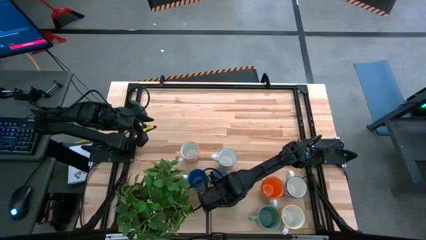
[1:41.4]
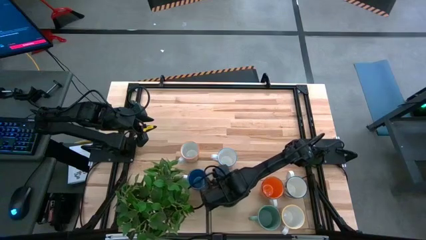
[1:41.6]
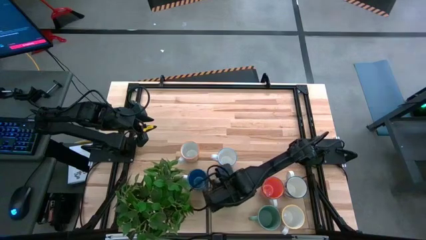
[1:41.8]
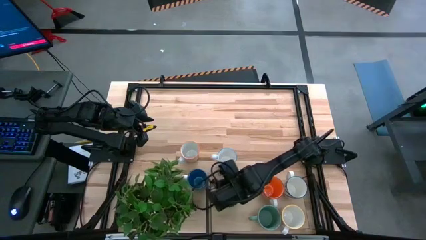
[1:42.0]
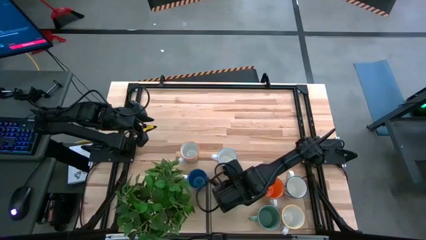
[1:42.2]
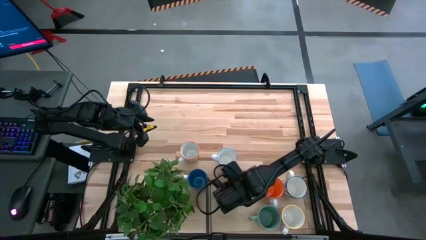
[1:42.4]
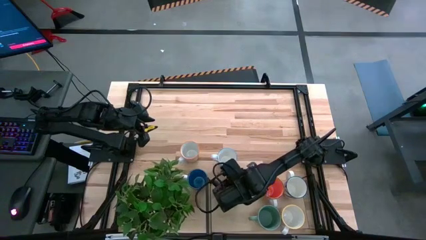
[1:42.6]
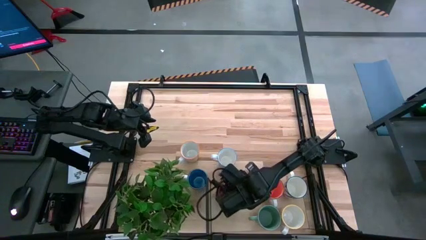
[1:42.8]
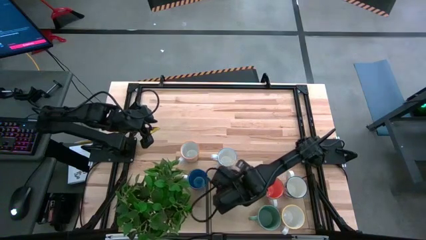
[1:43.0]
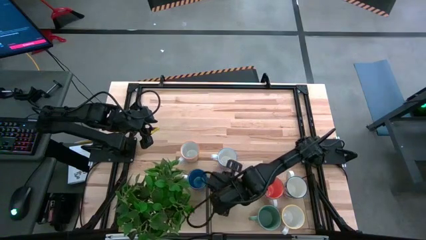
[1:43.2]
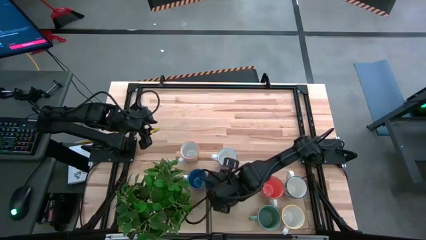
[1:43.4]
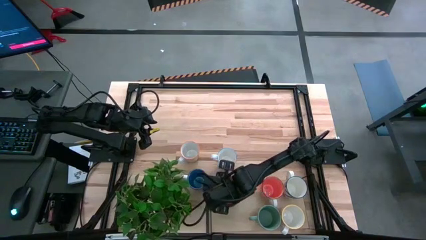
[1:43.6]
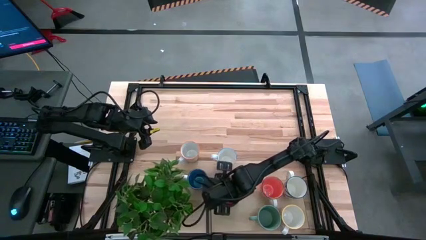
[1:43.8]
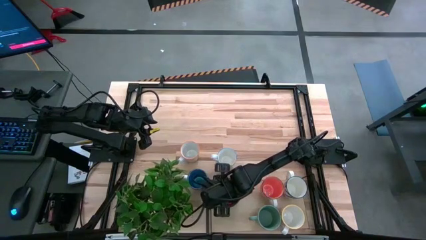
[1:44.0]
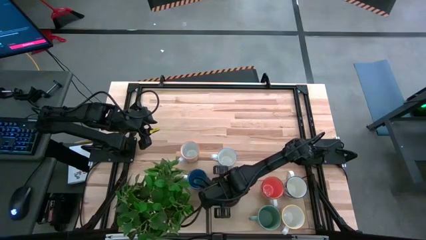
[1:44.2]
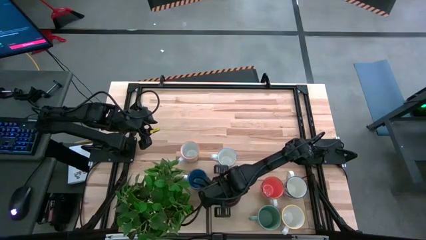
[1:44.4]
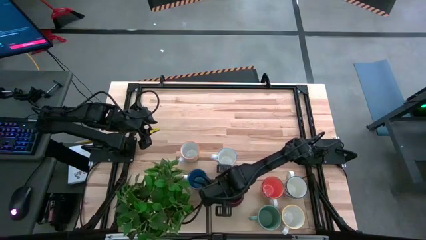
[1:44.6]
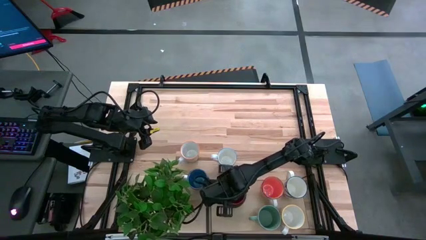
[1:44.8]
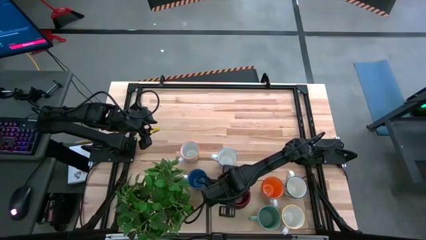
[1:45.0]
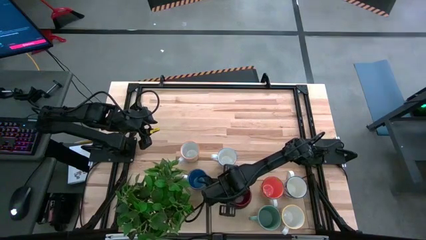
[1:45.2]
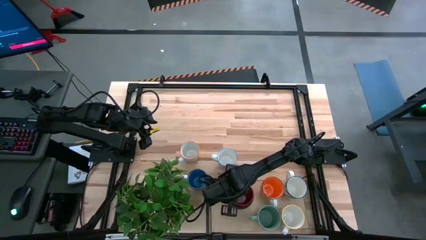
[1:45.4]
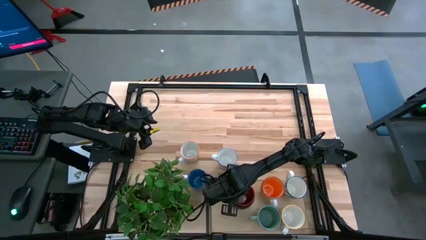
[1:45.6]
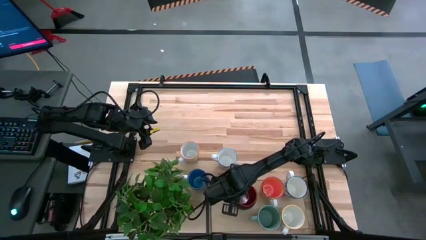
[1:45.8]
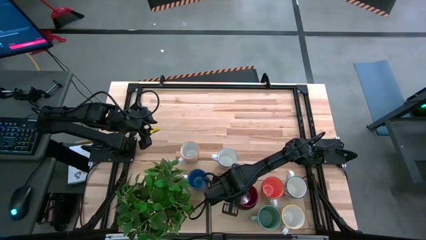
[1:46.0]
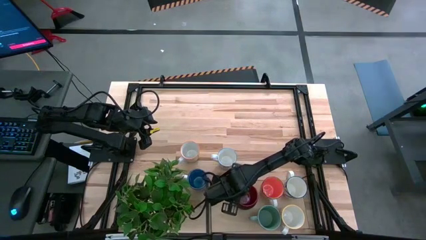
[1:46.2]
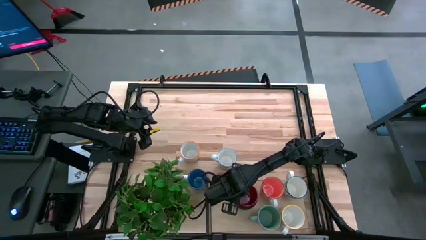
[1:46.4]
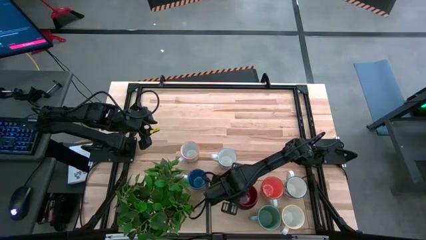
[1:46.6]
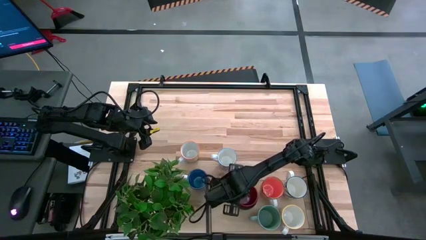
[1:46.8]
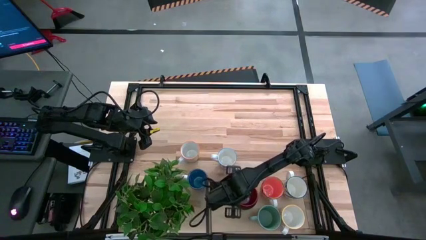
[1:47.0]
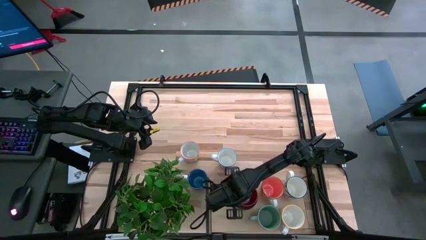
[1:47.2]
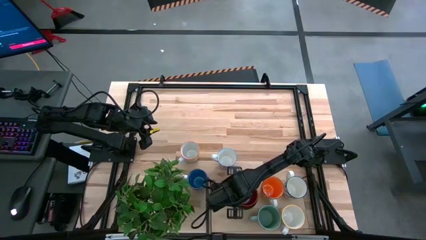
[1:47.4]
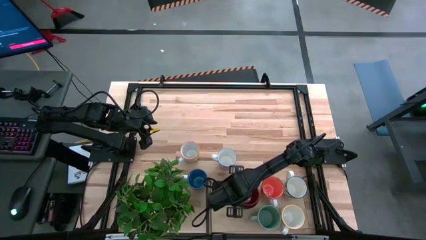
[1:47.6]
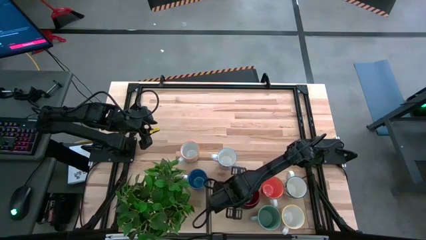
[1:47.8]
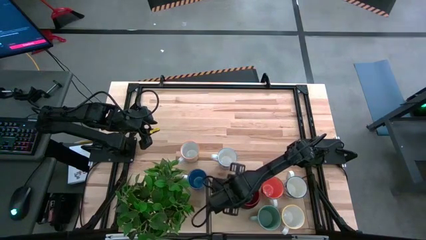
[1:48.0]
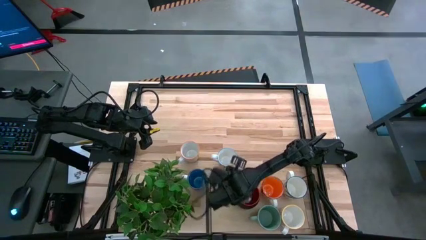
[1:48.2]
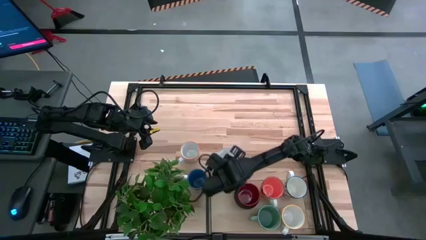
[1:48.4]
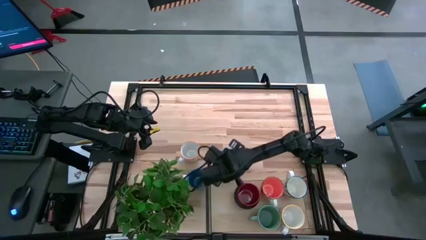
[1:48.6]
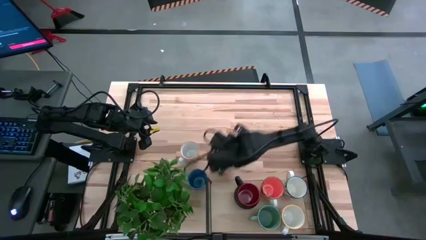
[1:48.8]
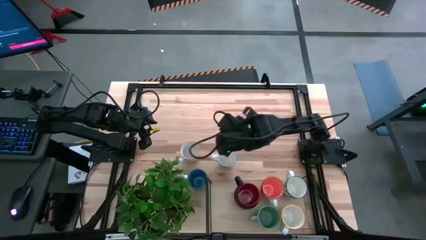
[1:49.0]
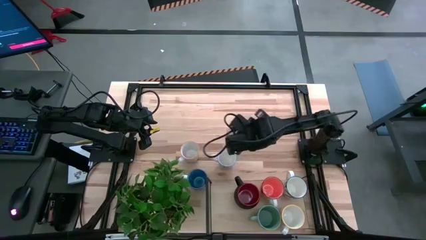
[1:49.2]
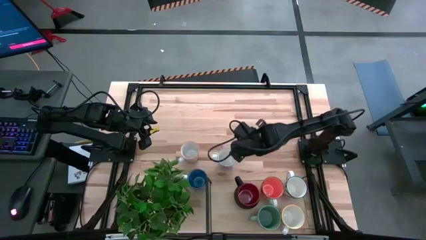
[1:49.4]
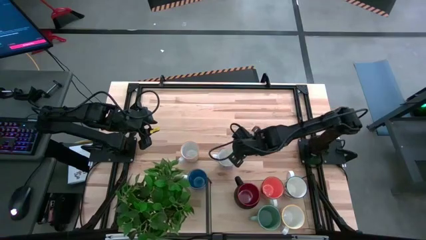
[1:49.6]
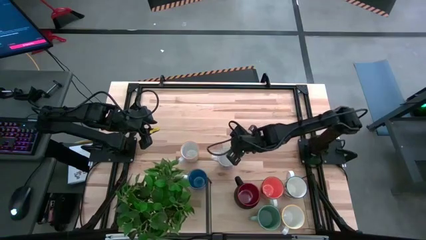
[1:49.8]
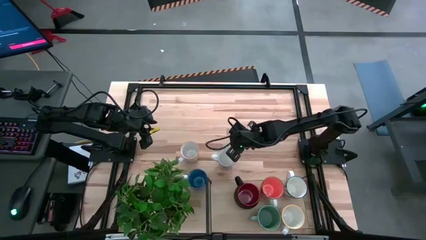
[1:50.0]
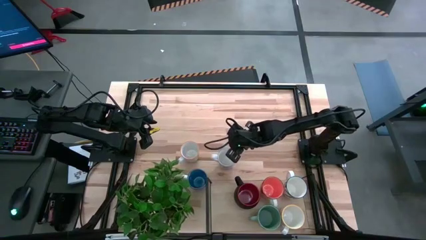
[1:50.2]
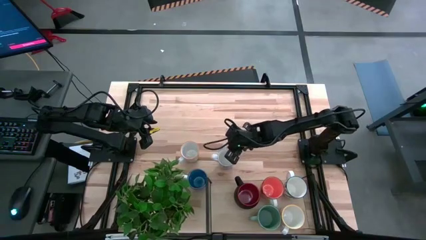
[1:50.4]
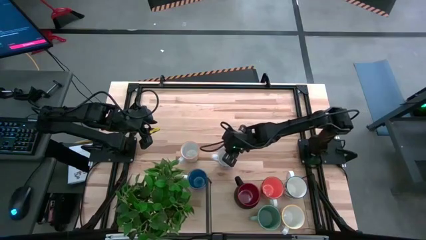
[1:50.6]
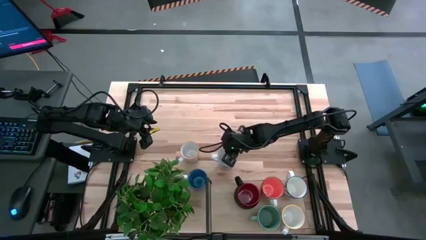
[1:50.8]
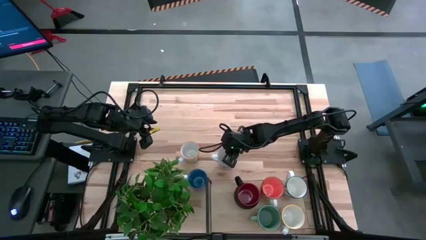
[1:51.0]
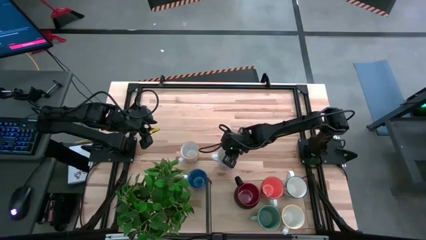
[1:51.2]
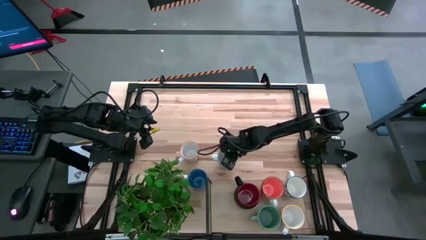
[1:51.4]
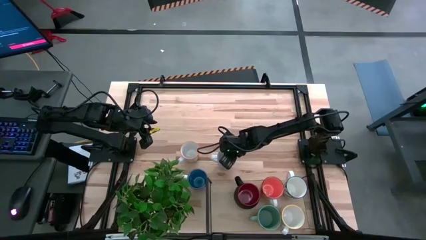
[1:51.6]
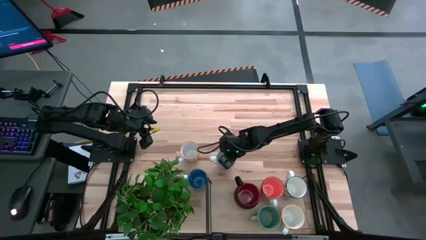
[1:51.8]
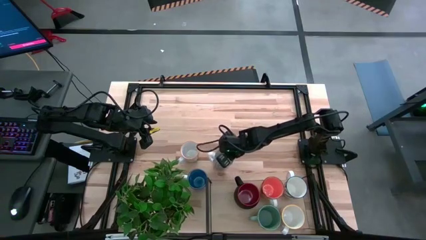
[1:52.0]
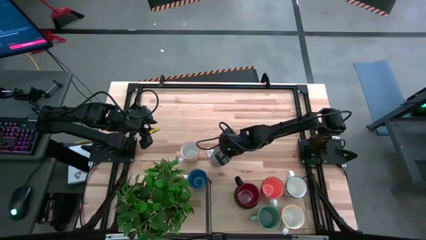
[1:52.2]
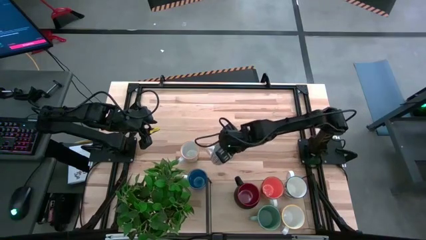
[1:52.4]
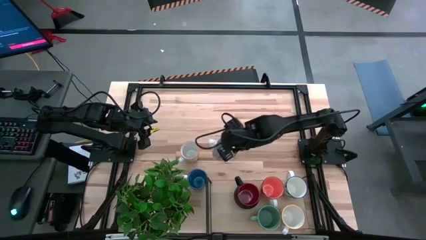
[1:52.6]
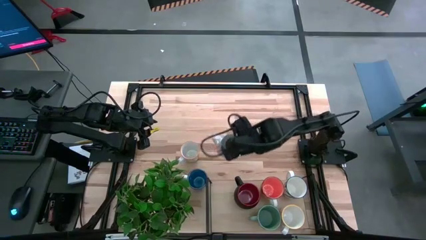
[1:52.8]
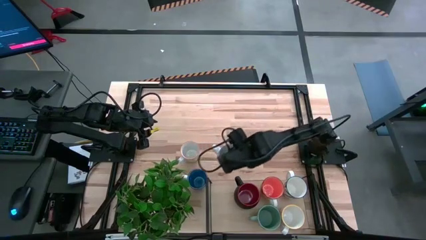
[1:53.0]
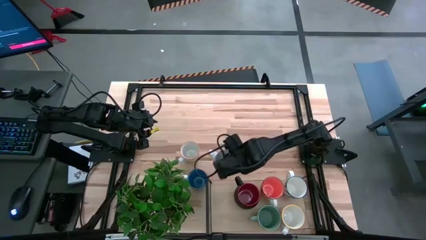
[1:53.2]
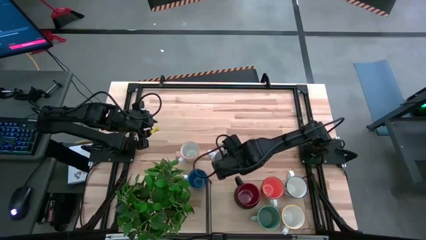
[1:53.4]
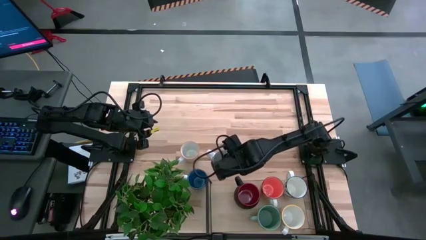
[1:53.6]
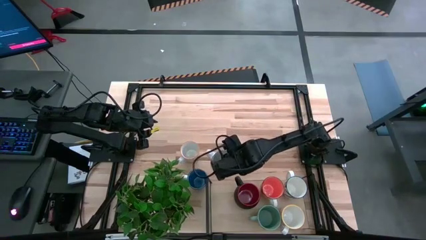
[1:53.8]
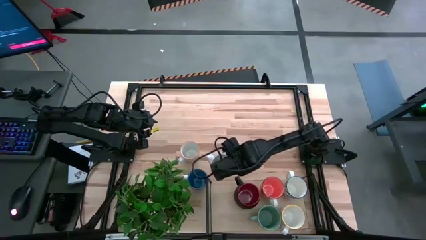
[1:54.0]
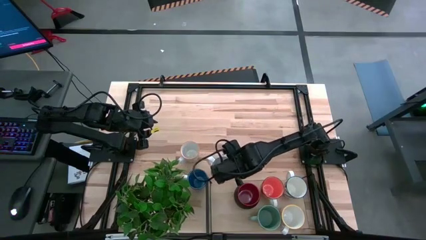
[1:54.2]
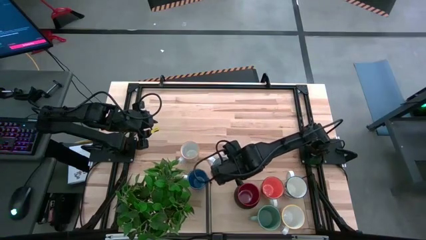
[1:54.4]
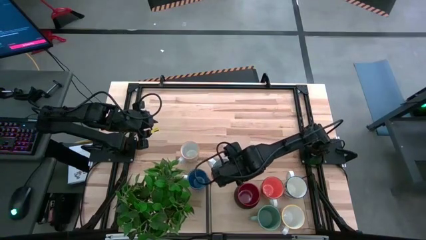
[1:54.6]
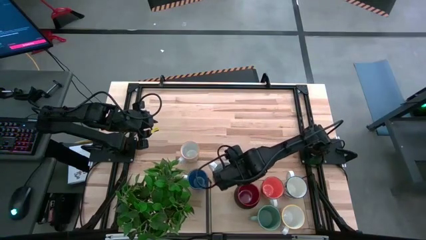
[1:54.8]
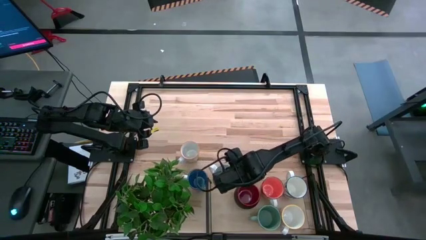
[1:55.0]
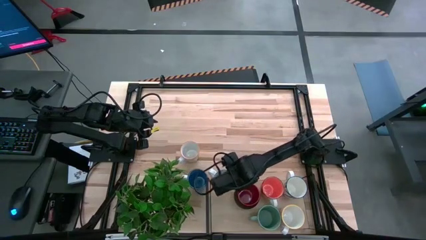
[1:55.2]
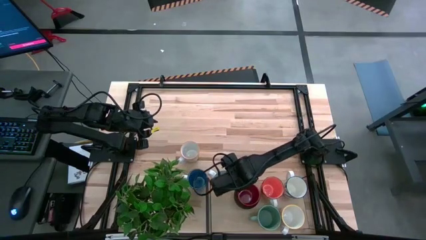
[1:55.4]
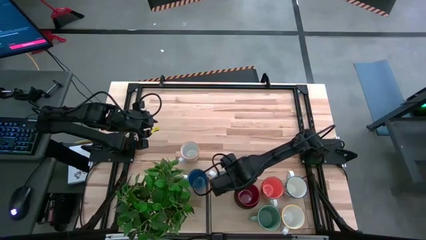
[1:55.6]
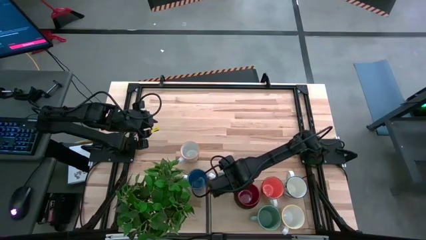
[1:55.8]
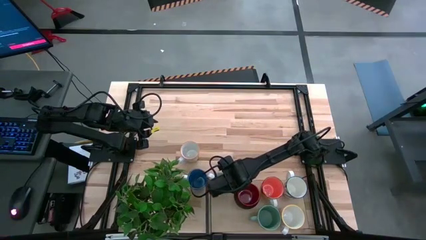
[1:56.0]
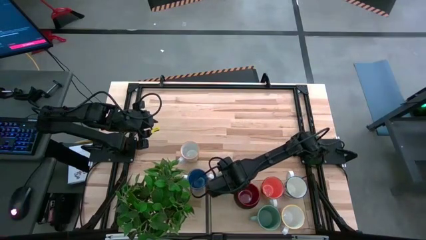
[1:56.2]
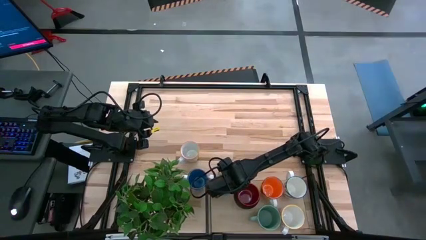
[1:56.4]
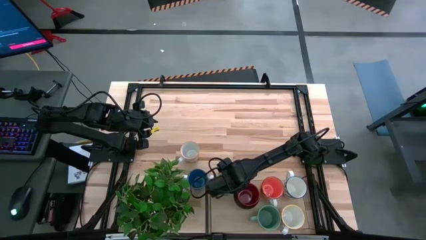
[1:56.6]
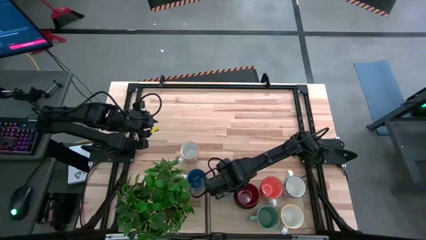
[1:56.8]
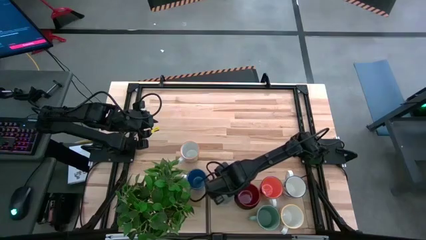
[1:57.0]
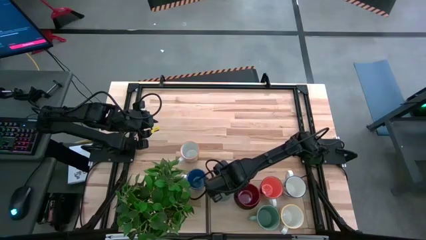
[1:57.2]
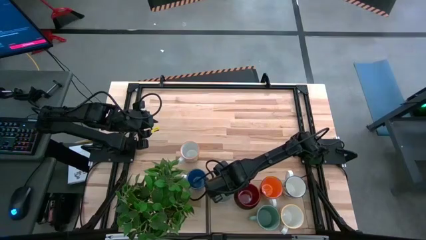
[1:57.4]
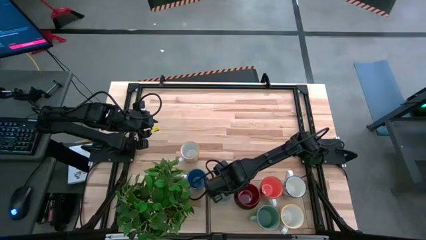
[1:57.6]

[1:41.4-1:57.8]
Task: Place coffee mugs
Put the red patterned mug on the shelf
